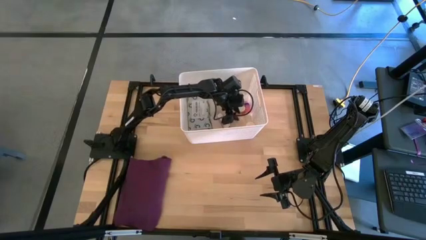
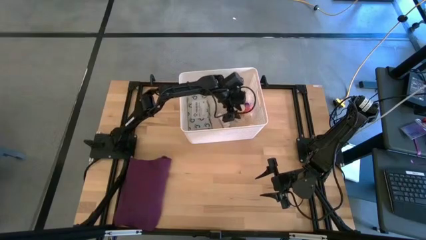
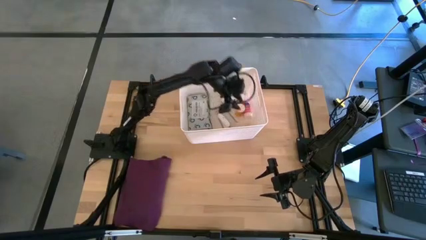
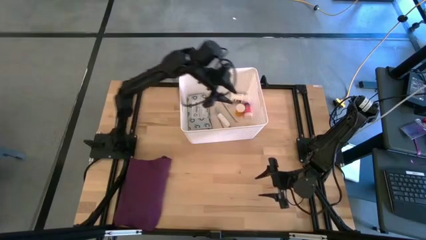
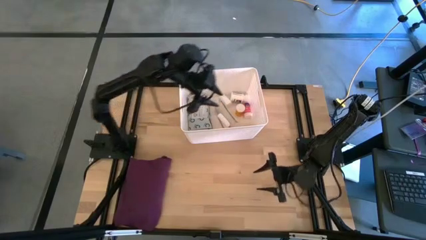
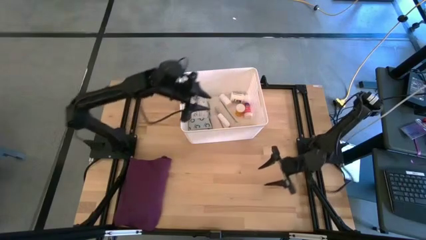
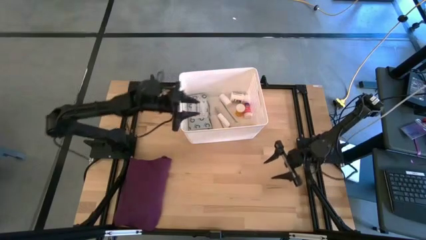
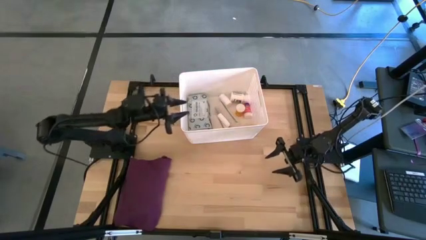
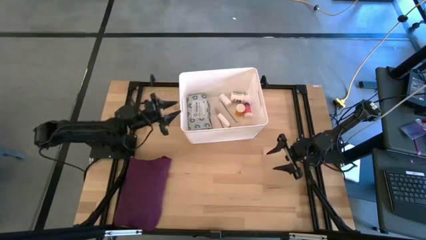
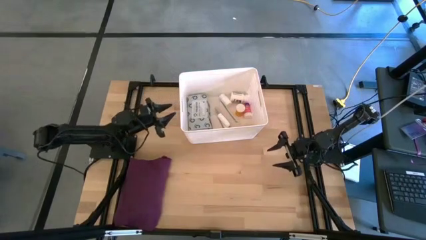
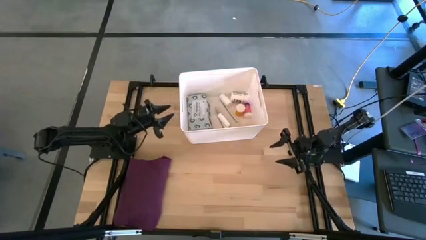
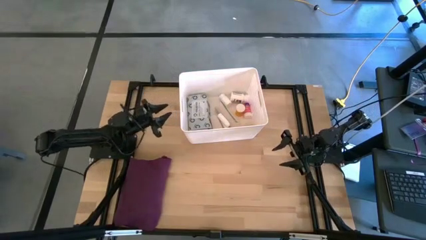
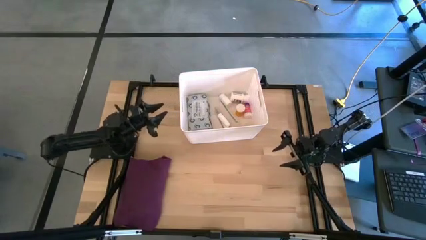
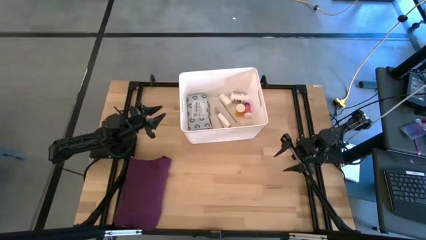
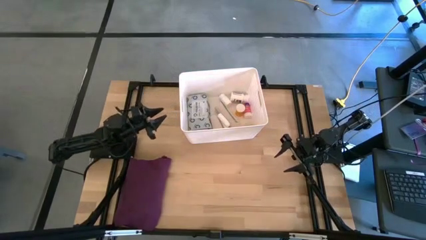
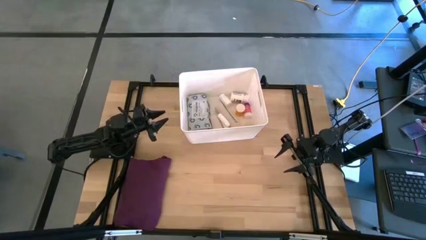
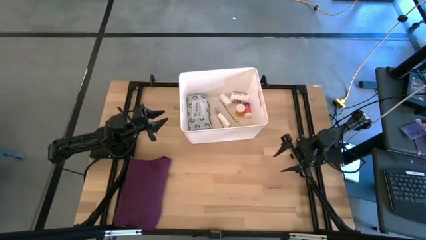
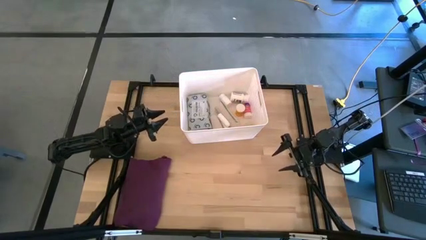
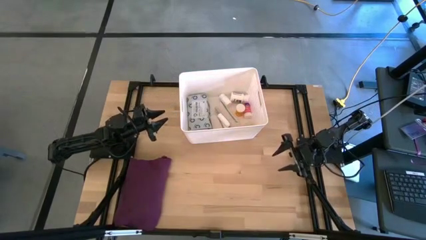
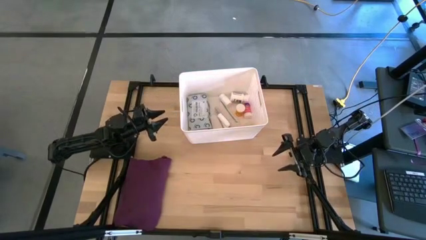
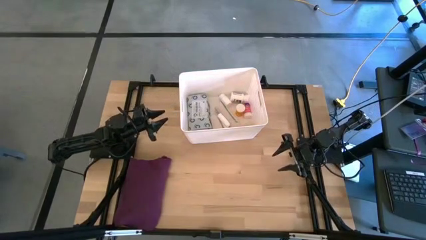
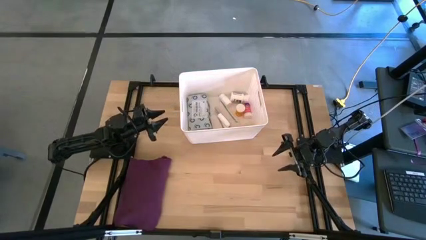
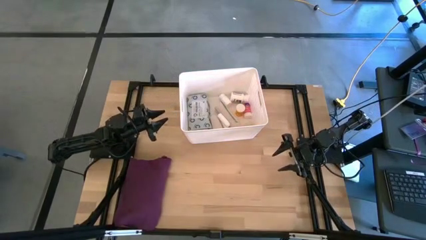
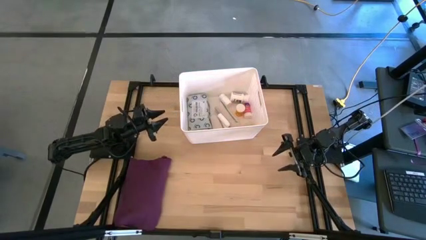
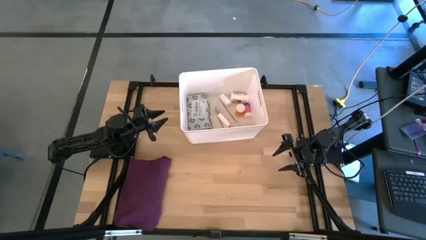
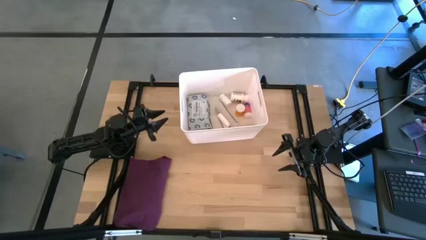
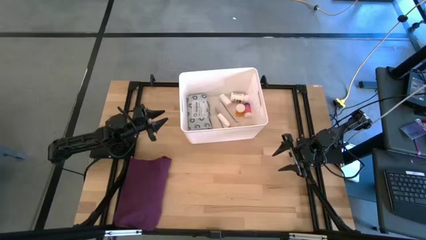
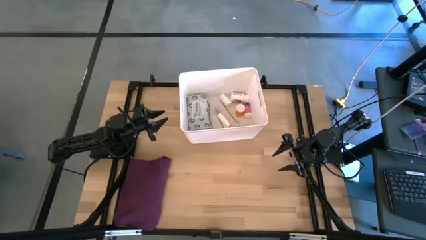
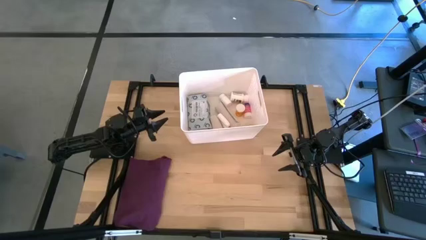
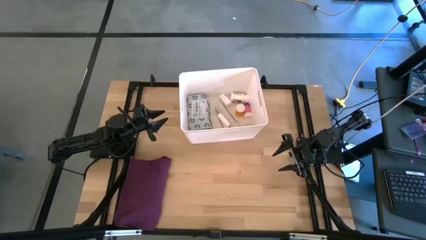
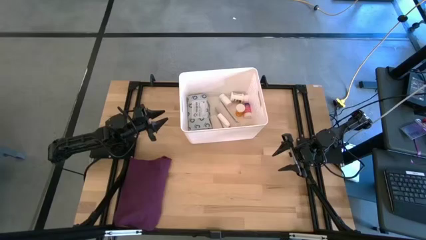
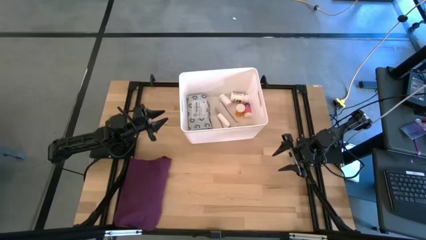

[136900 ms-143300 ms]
Task: Pick & place medical supplies in basket/bin
Return to Home Position

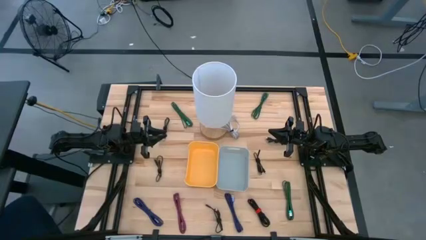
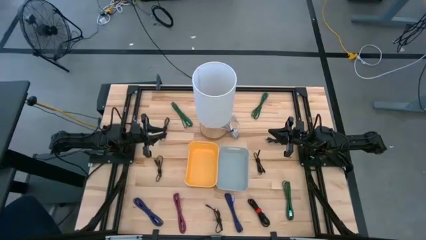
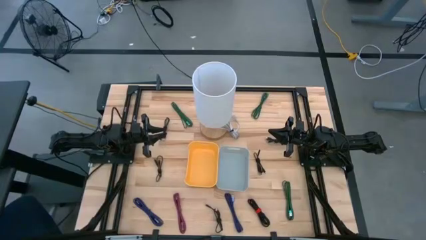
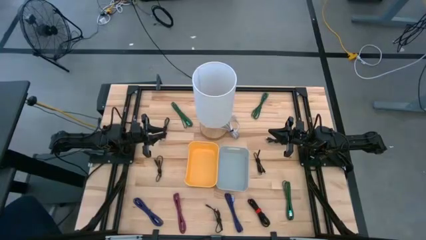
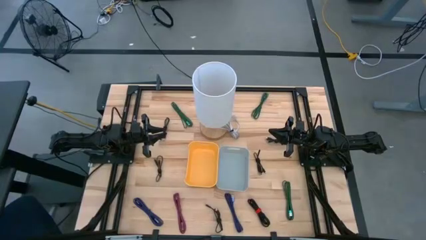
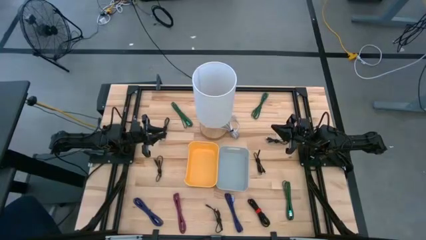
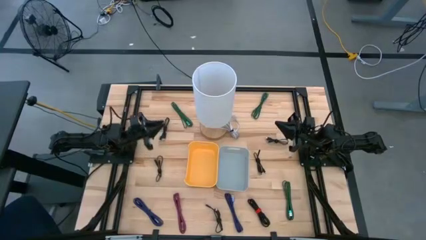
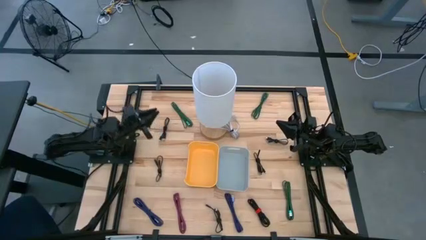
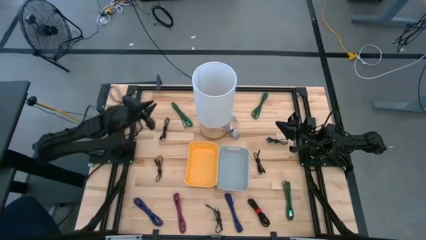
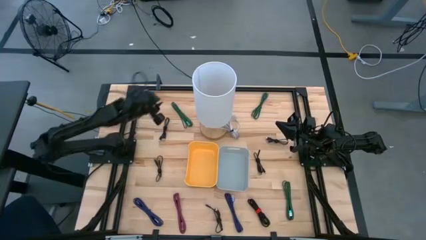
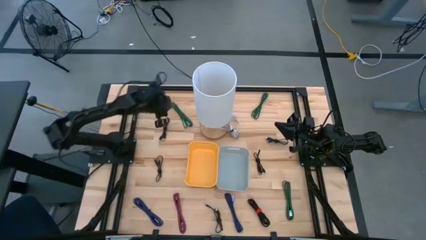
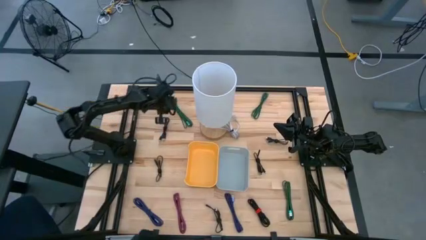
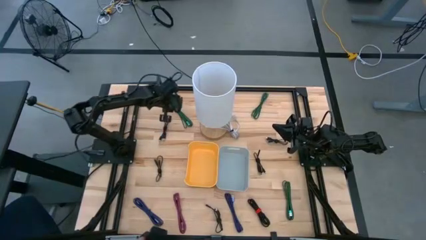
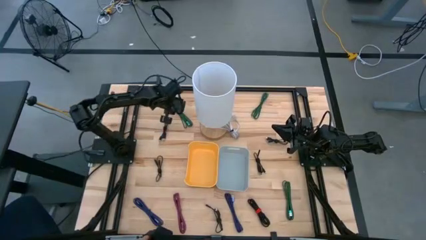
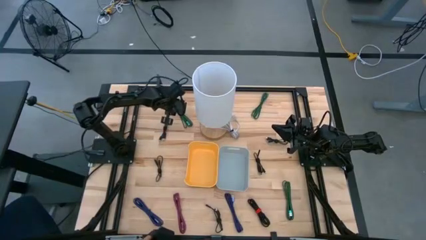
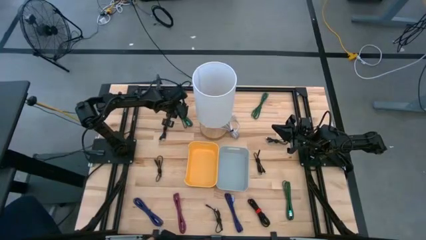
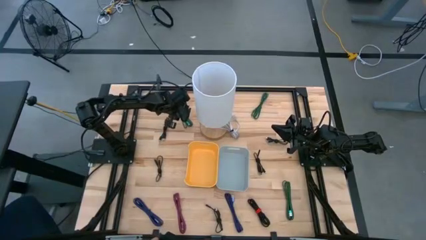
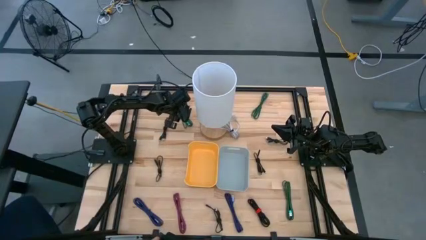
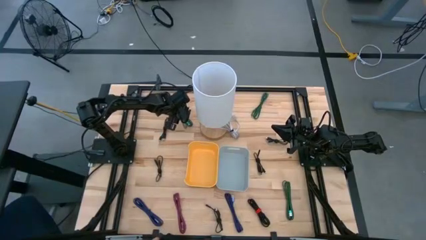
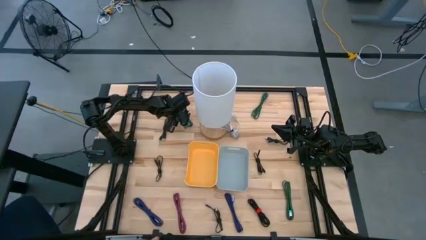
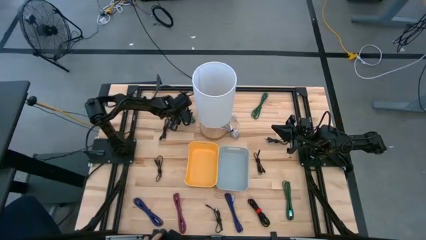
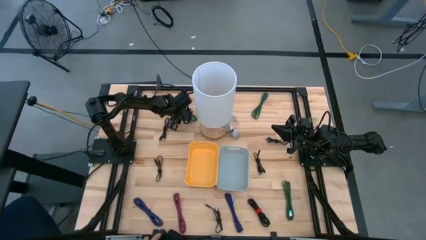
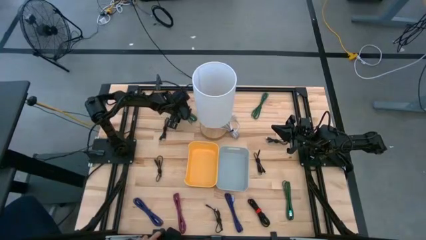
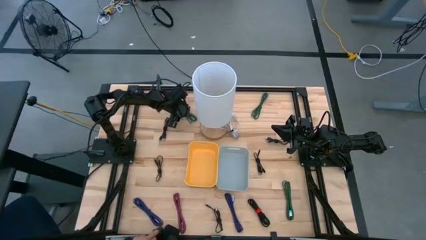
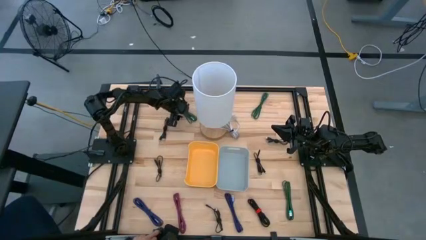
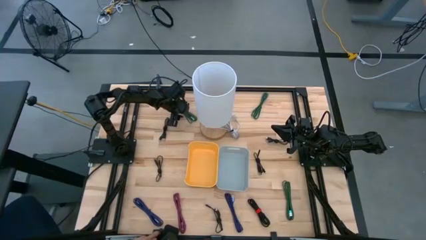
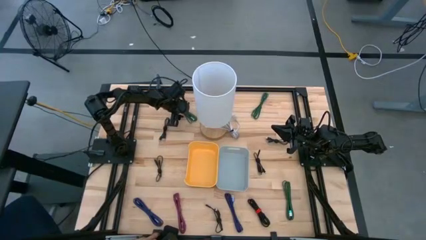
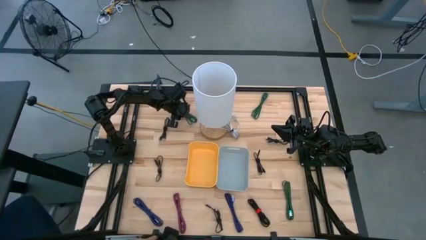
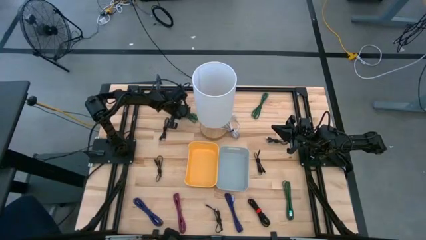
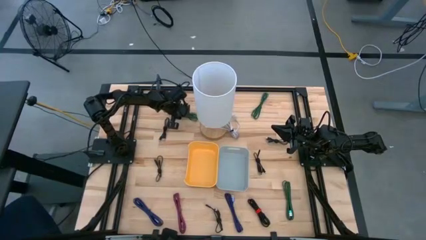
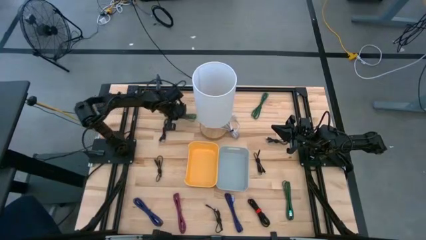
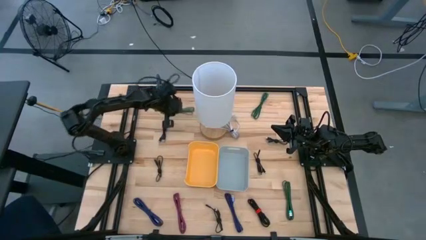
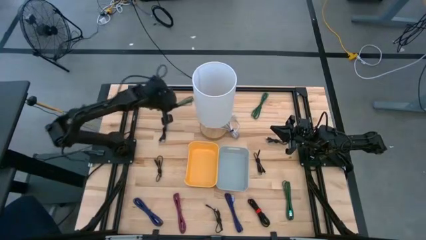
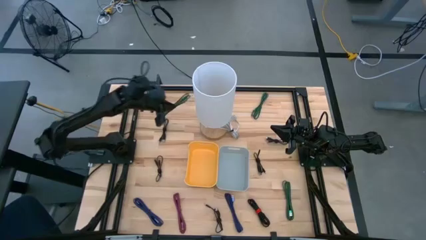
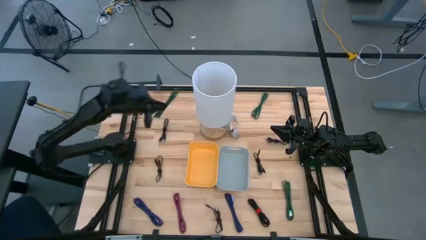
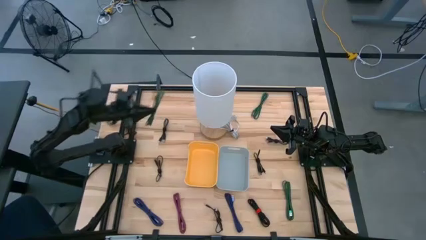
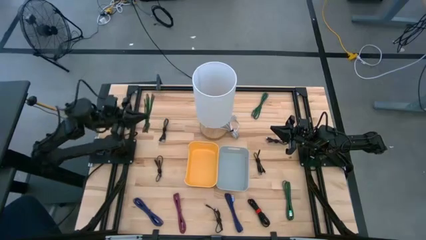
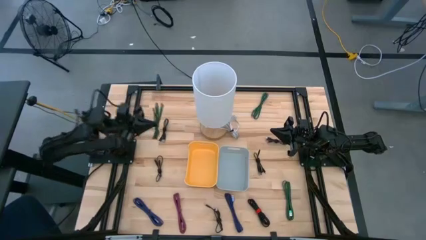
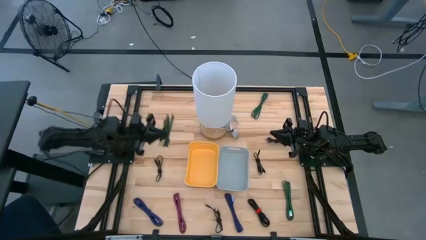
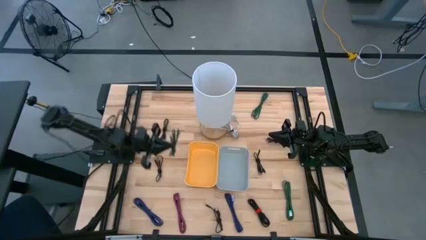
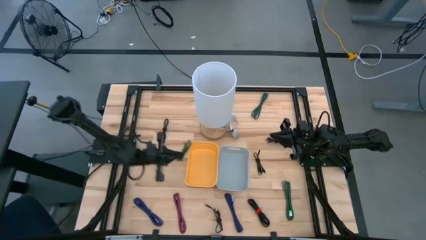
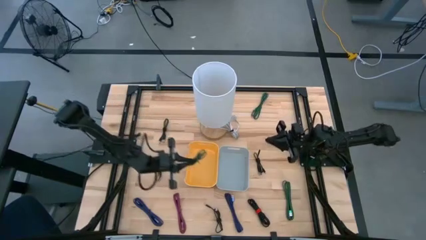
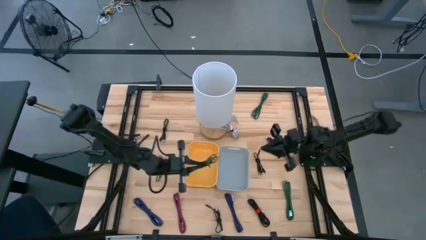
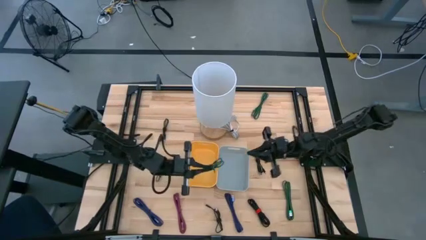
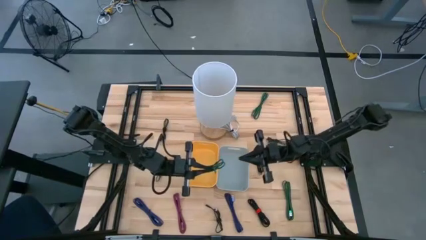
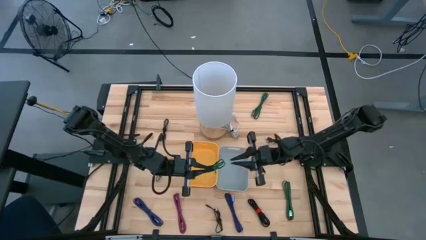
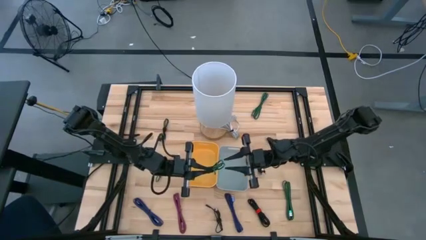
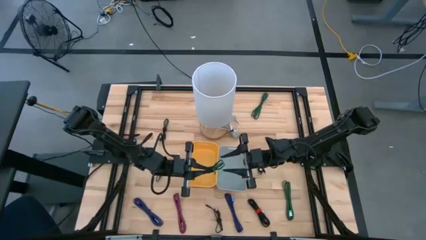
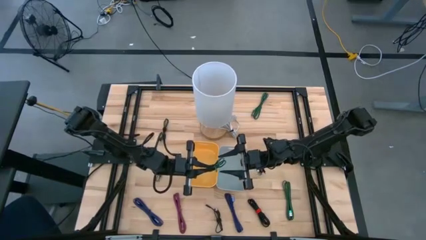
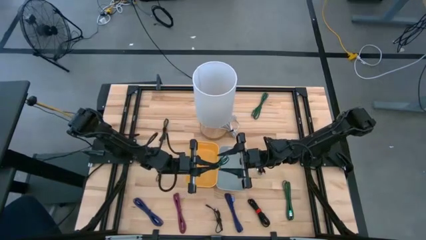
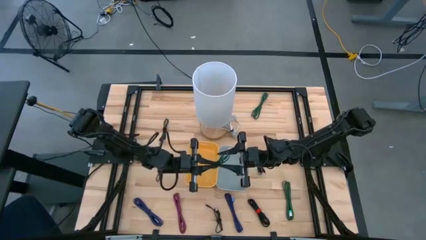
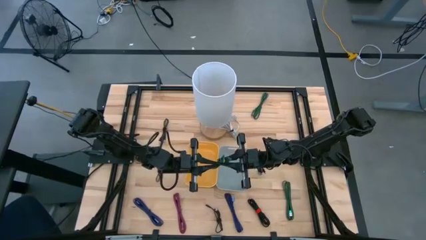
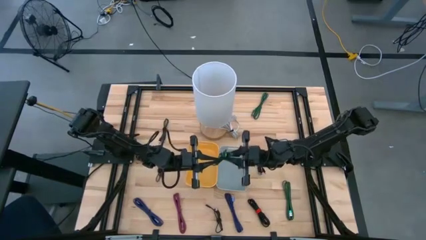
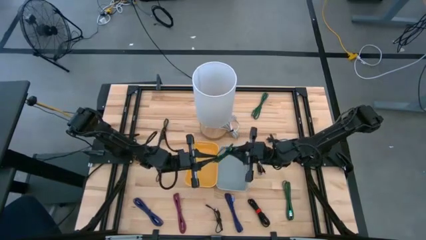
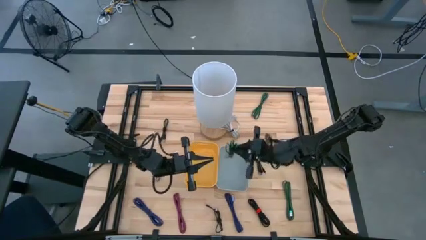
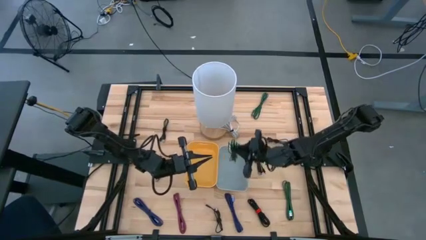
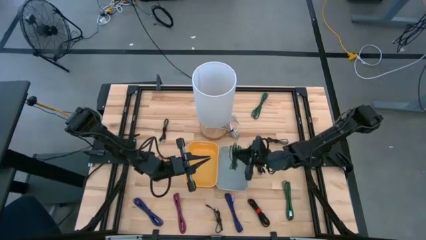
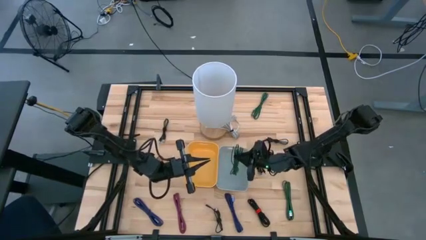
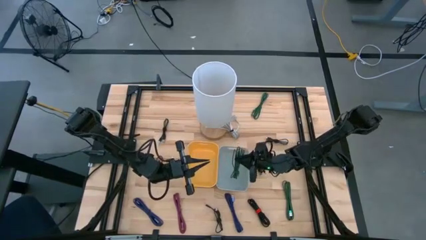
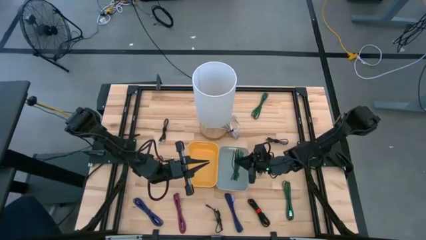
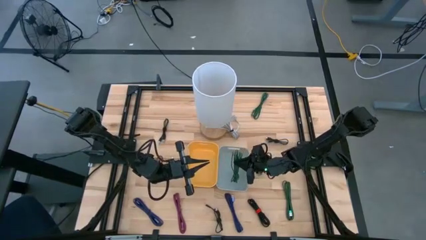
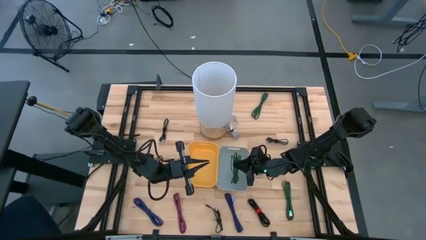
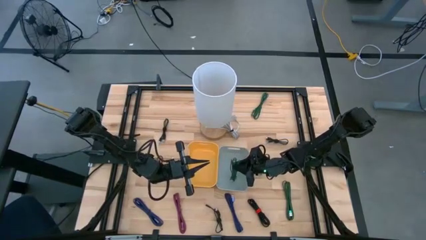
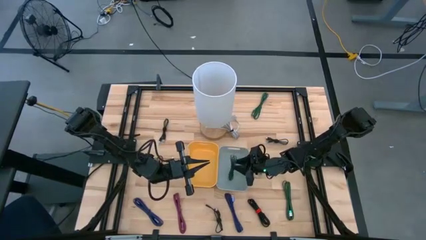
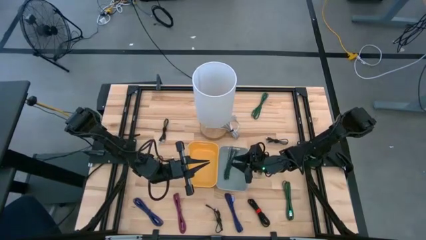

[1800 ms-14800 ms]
Task: Pick & Place USB Port
Put the top left green and black charger cable into the gray bin
